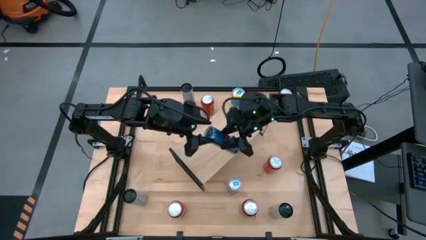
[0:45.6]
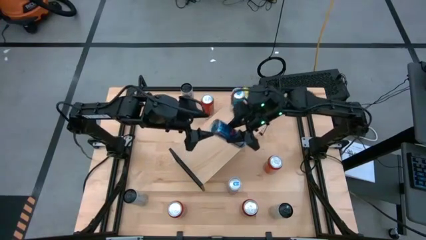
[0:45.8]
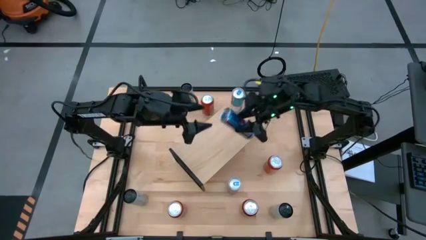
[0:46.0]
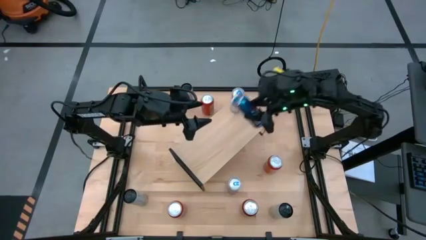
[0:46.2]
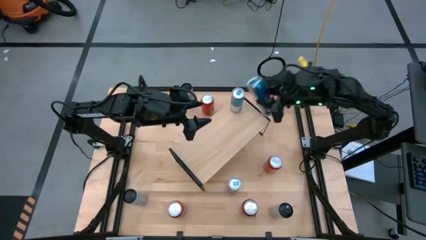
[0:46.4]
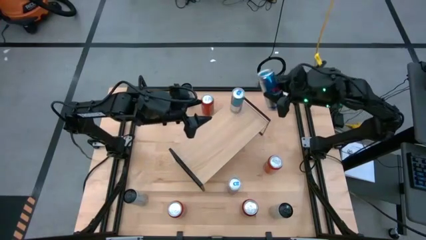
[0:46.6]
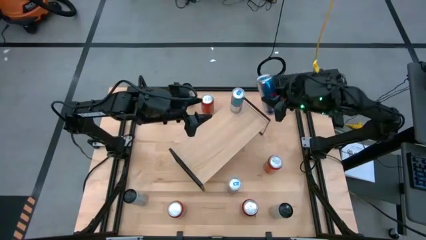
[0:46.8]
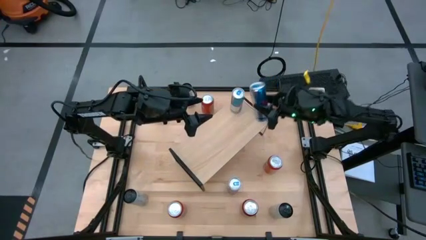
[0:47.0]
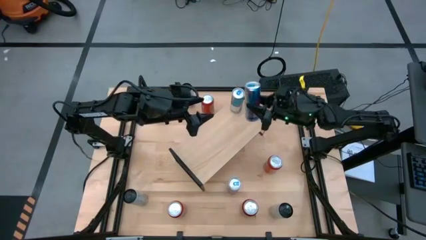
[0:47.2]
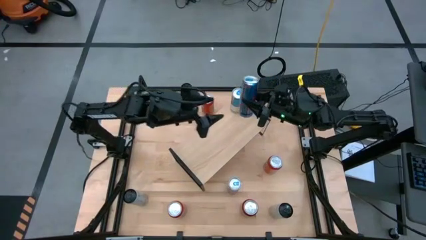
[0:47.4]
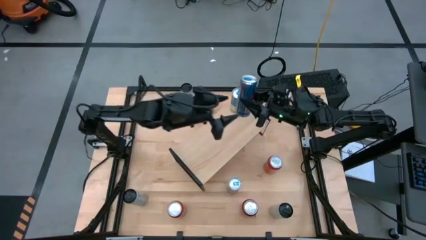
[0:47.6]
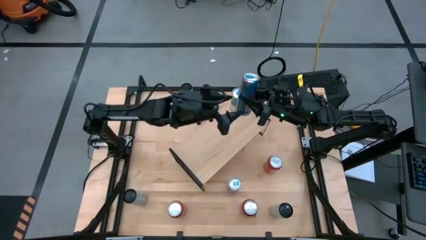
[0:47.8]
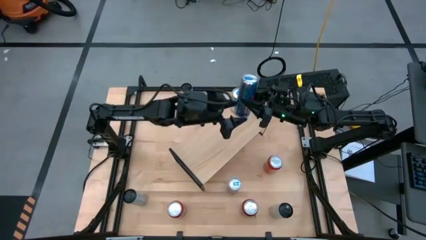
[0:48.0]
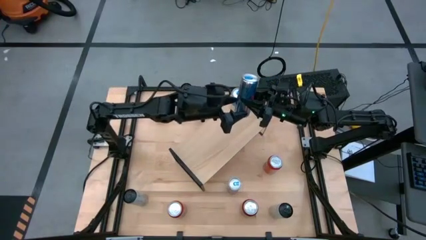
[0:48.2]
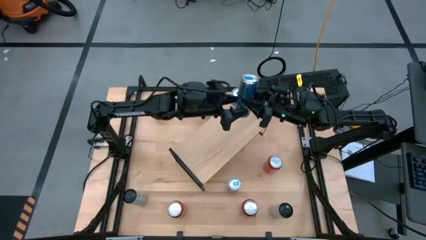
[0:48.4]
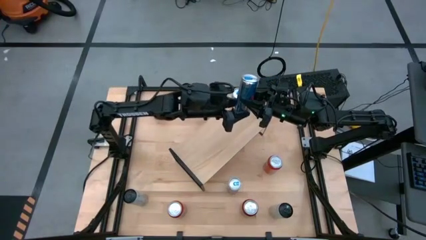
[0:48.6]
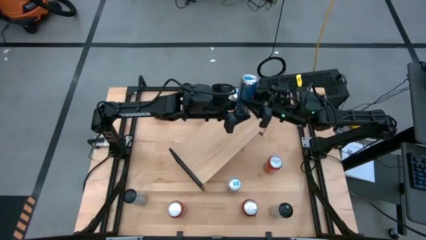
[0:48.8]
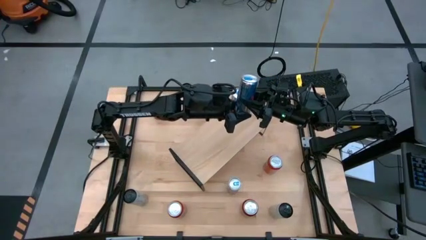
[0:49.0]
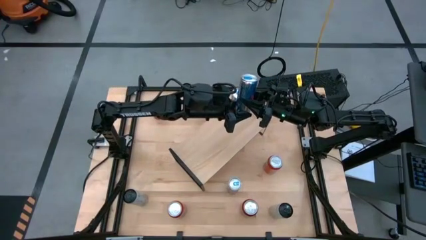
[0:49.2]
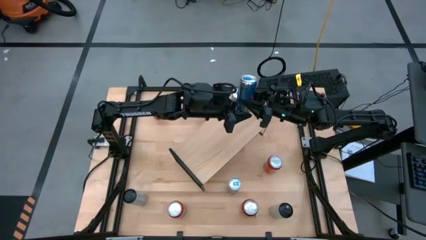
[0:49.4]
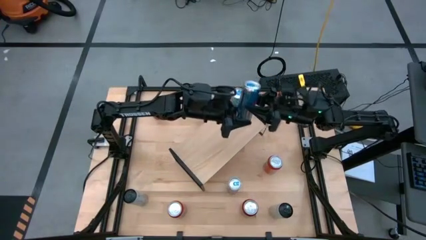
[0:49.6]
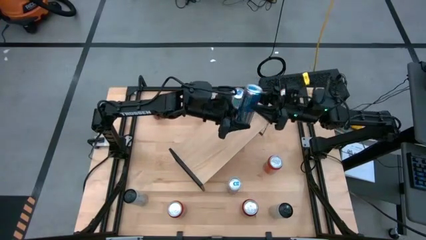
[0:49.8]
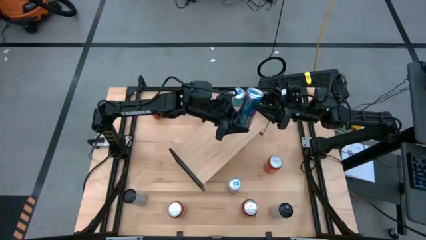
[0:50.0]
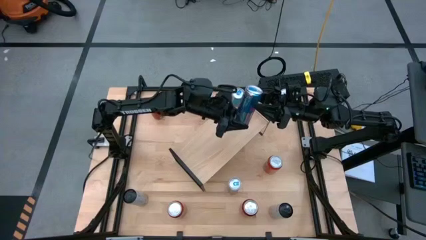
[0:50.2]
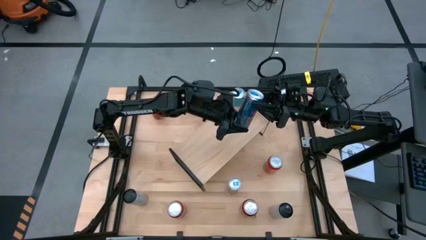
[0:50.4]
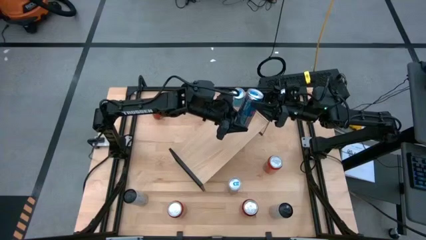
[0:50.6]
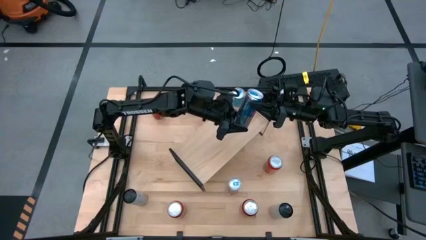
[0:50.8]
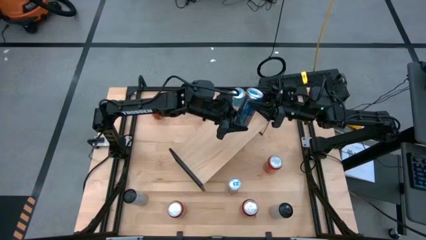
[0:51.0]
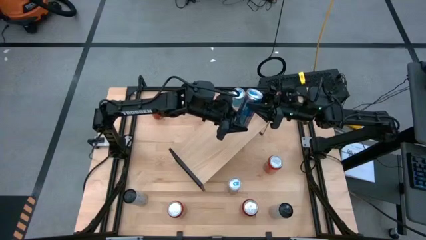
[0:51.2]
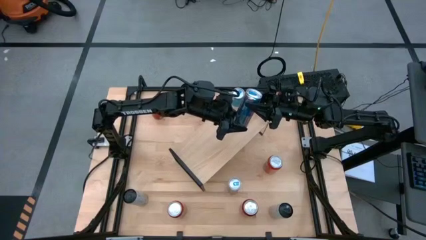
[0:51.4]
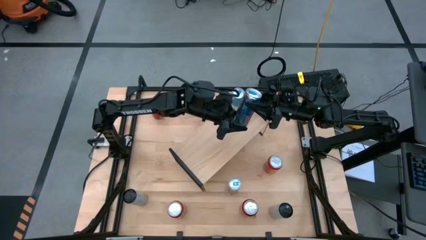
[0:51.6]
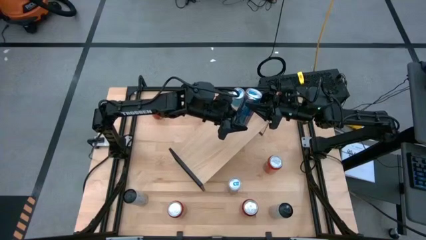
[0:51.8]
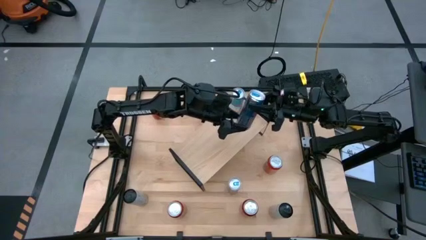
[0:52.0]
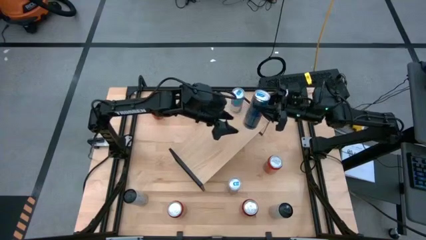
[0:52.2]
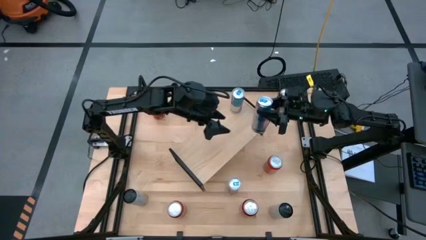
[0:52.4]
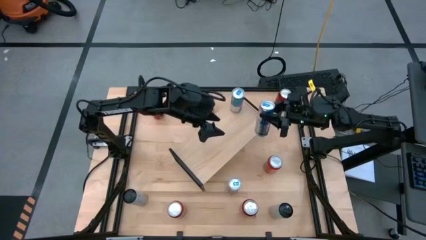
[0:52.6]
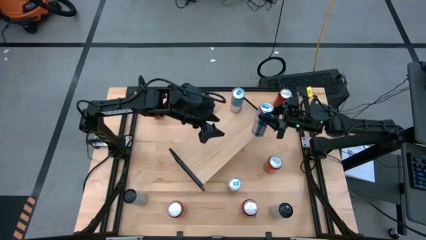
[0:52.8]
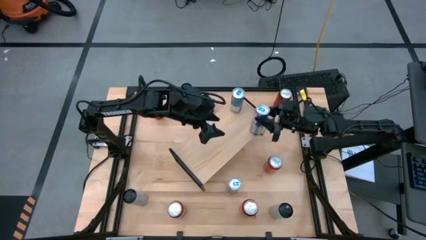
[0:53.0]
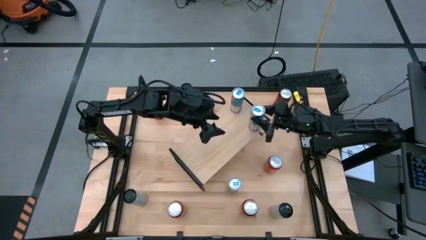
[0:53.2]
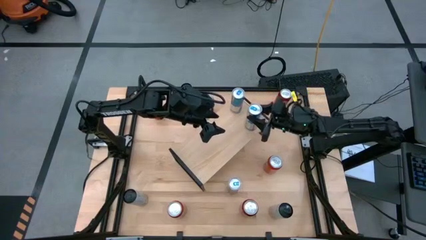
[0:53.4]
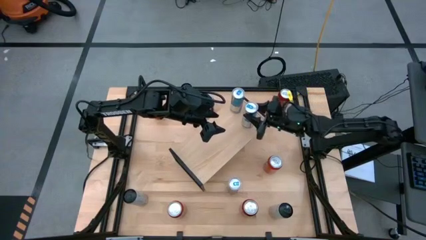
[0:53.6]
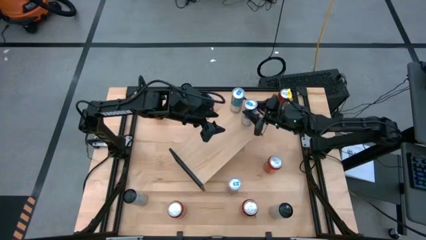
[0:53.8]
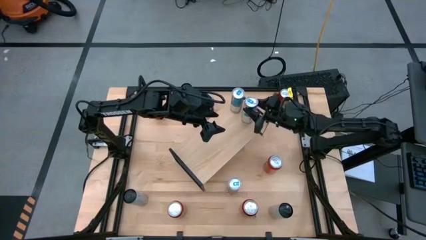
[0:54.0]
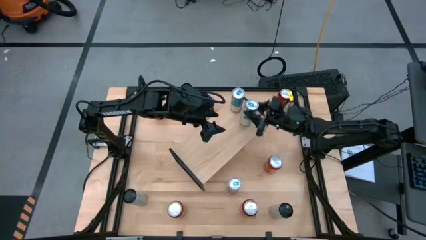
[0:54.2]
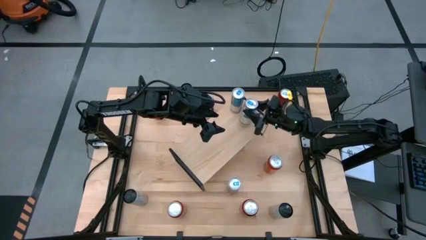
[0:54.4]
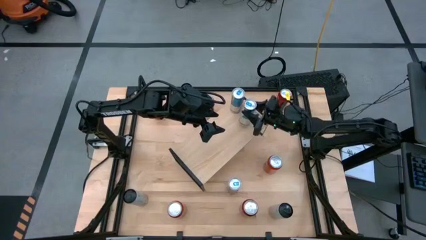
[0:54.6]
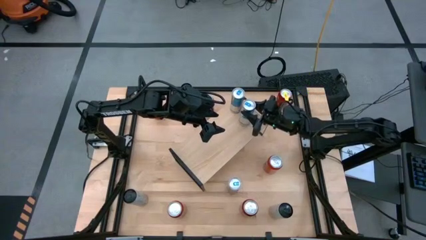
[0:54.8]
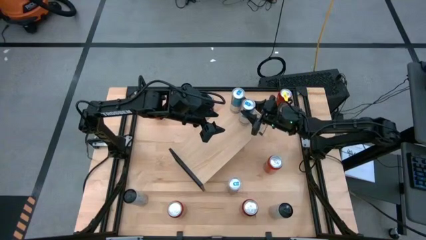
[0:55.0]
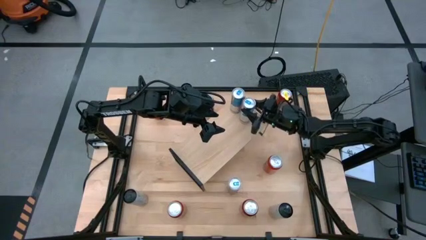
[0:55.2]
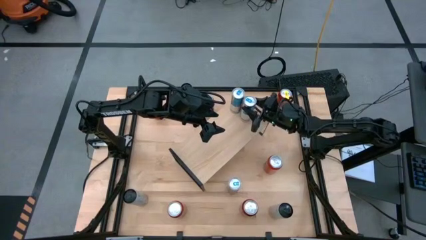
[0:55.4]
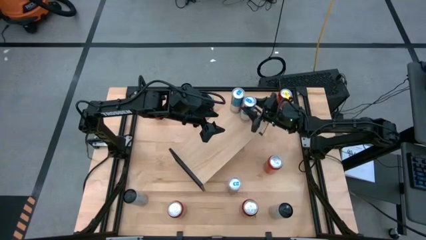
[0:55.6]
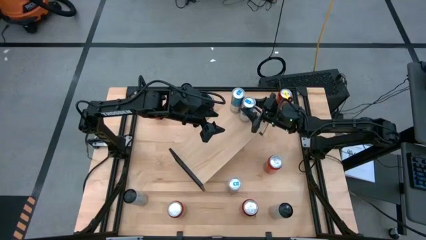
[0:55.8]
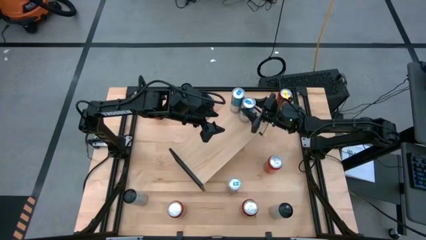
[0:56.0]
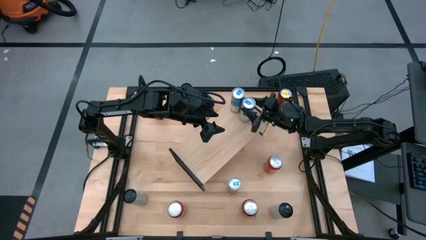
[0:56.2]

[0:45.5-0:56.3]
Task: Place canned beverage on shelf
Put the left blue soda can on the shelf

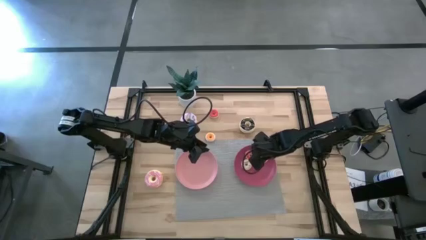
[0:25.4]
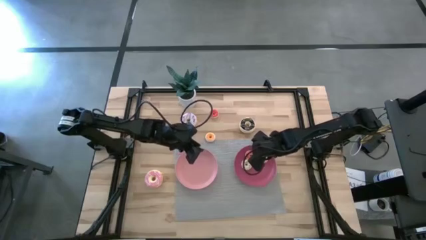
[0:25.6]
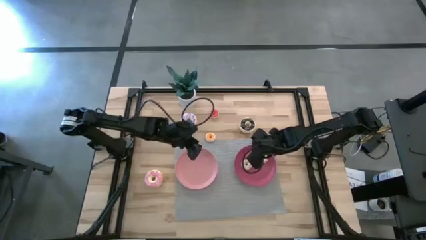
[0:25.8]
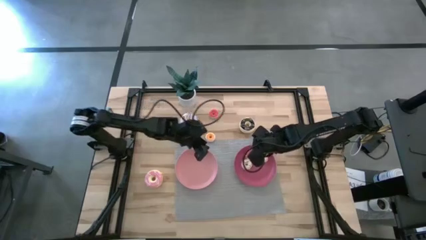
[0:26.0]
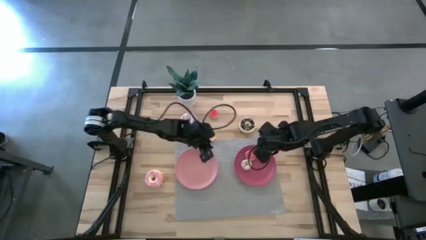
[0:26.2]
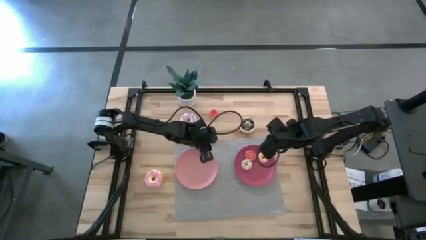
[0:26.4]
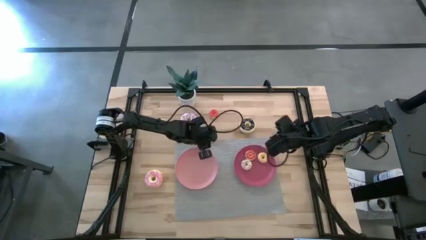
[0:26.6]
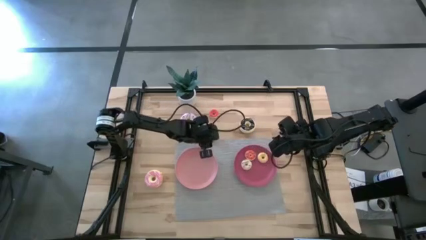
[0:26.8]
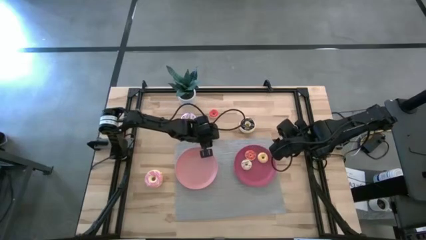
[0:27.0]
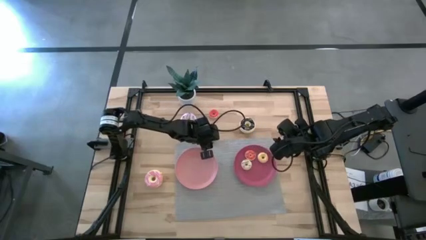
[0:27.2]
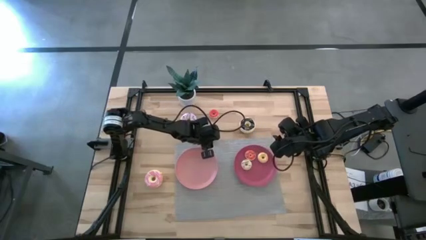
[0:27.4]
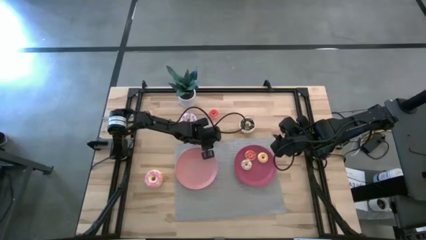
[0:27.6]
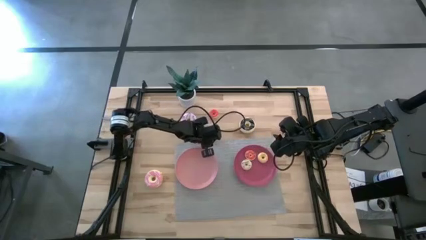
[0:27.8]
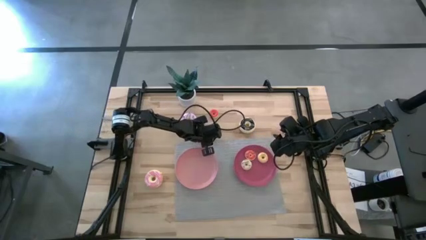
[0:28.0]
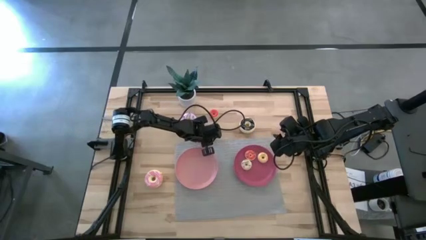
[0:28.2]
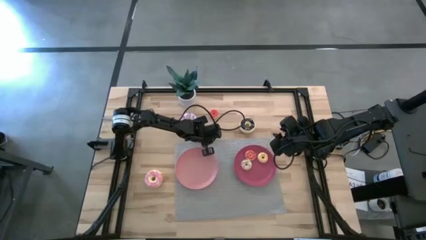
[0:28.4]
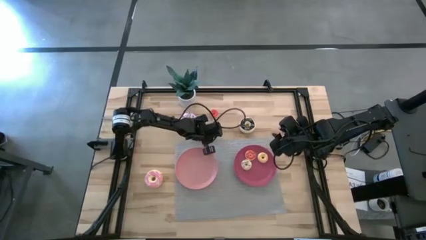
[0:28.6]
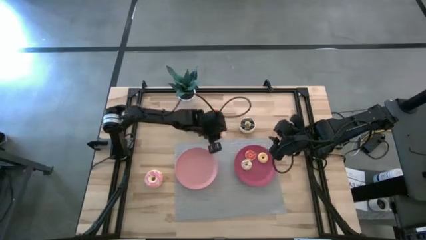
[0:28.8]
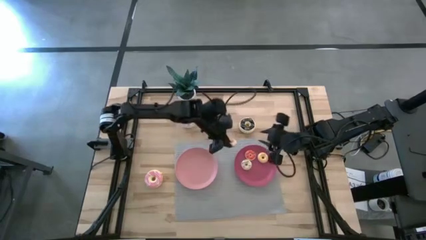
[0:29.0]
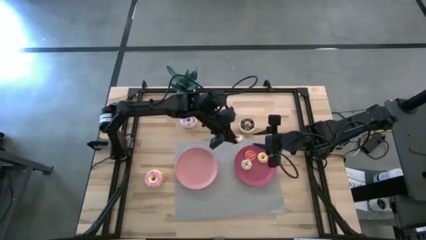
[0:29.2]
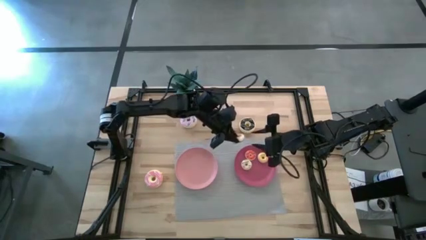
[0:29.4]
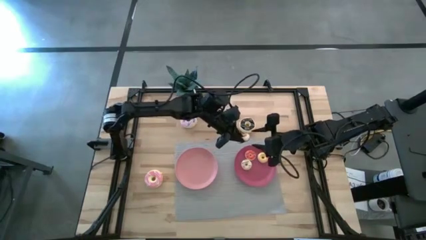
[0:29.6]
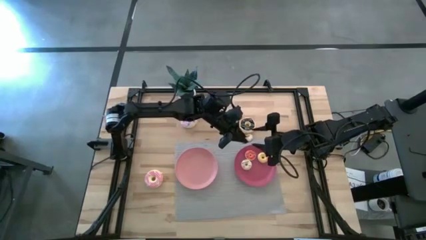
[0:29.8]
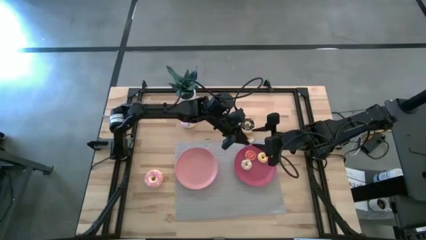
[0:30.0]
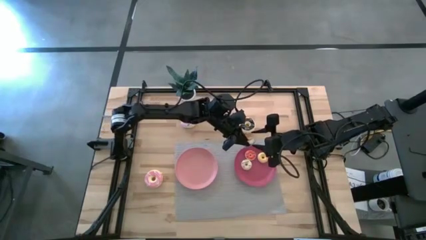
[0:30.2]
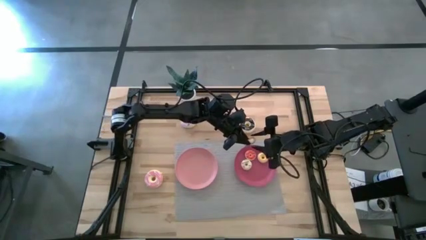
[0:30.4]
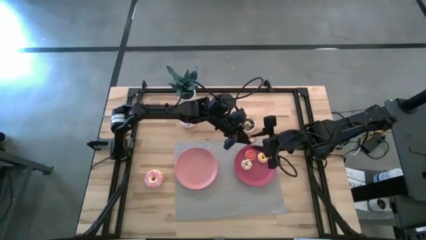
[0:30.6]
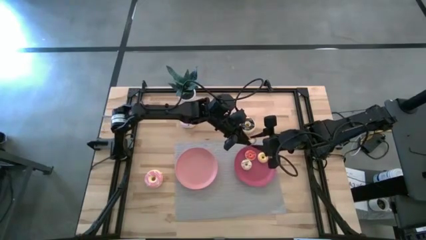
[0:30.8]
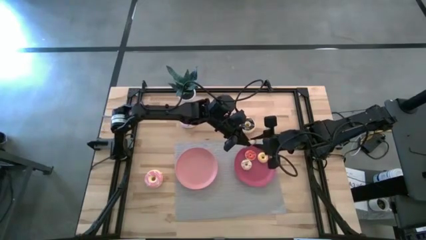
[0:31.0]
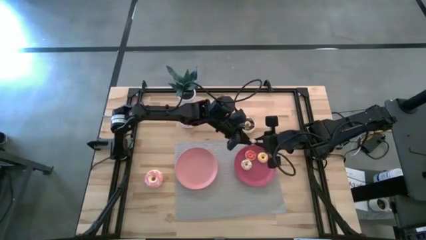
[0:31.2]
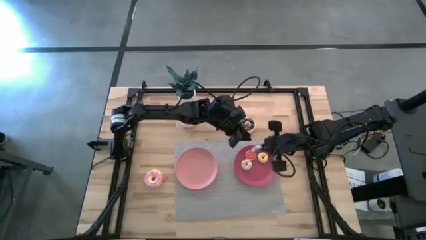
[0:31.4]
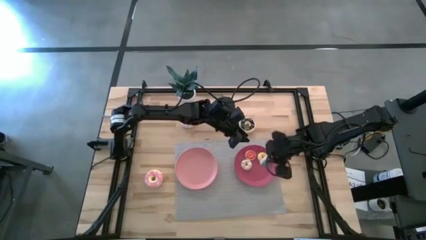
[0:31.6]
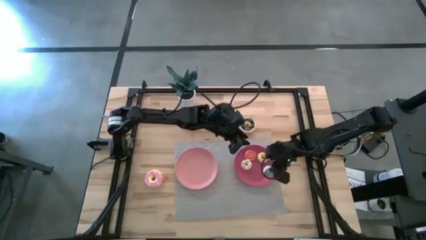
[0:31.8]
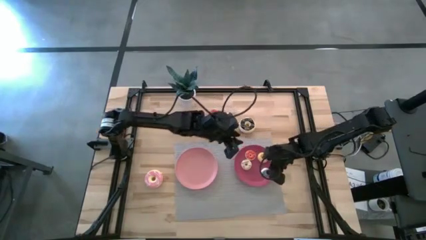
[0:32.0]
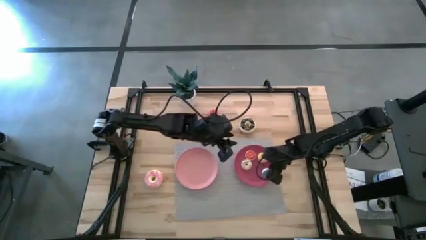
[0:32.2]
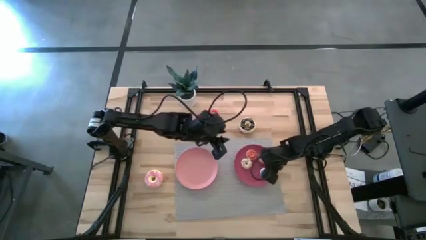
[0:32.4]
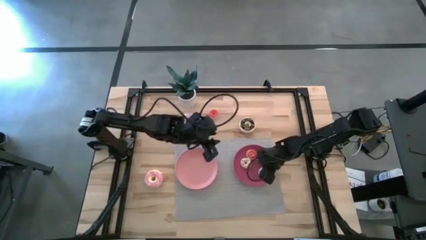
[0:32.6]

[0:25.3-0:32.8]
Task: Pick & Place donuts
Put the small blue donut on the dark pink plate
